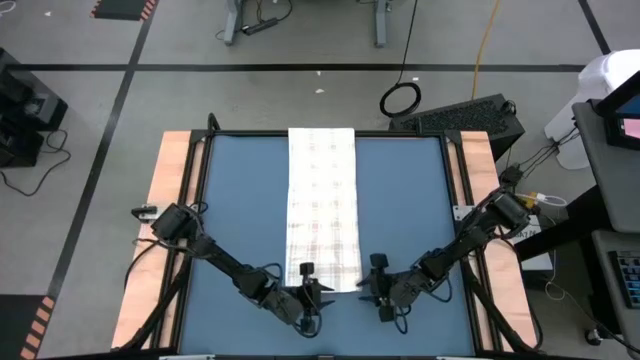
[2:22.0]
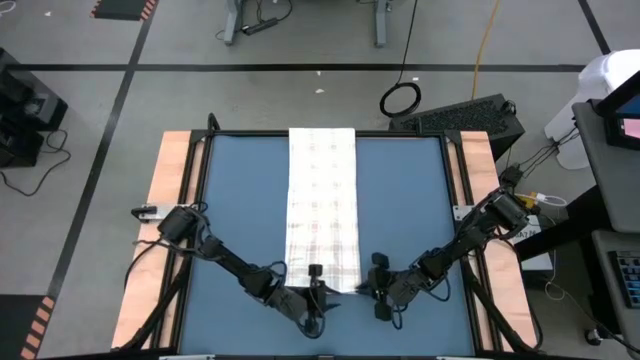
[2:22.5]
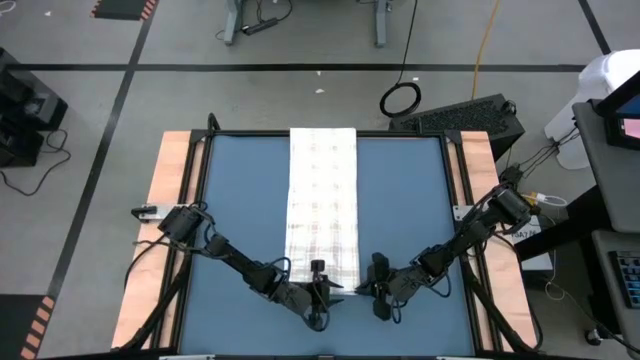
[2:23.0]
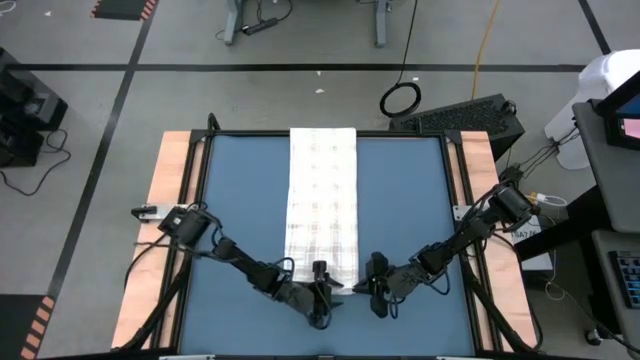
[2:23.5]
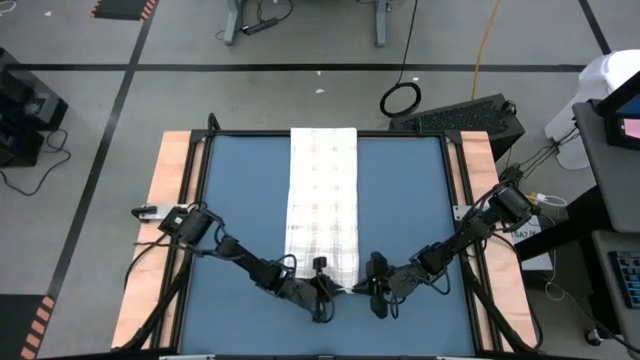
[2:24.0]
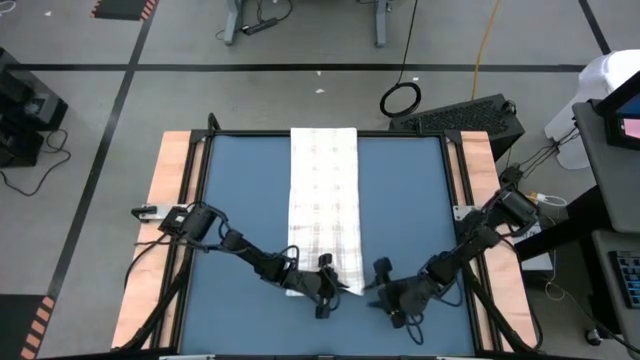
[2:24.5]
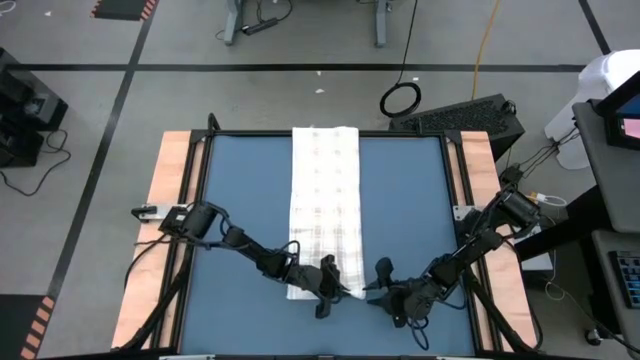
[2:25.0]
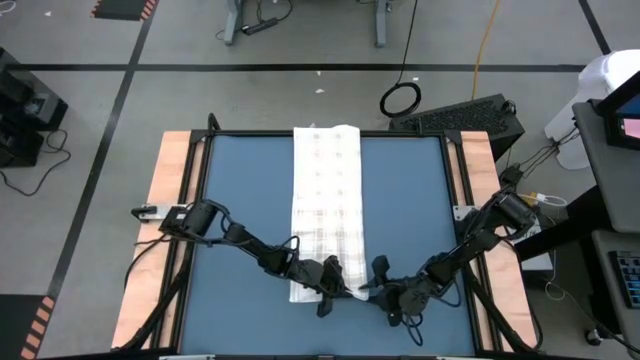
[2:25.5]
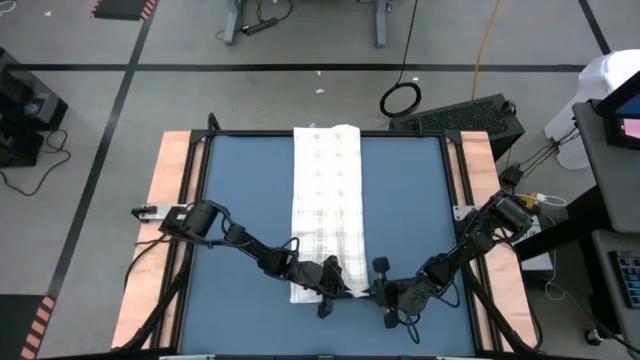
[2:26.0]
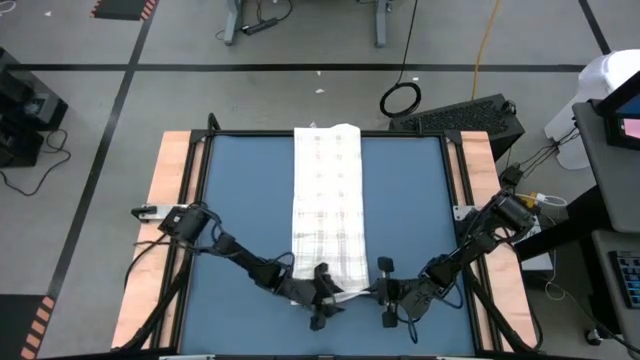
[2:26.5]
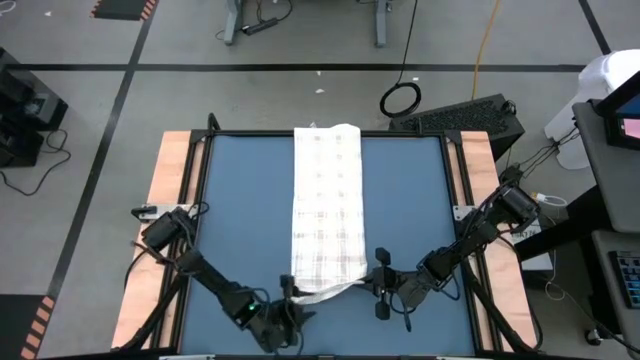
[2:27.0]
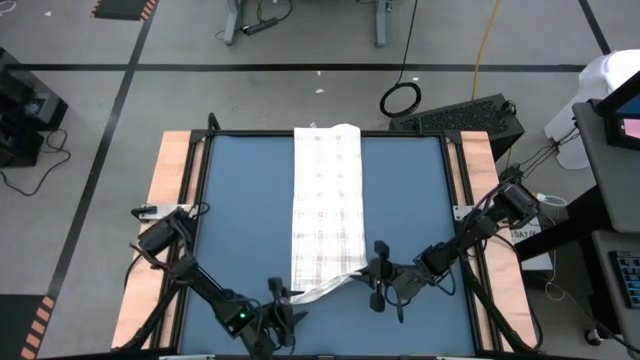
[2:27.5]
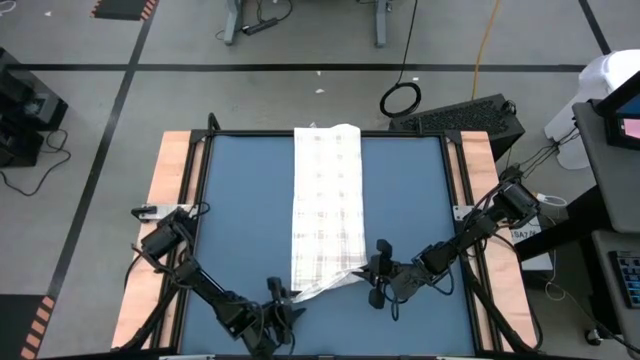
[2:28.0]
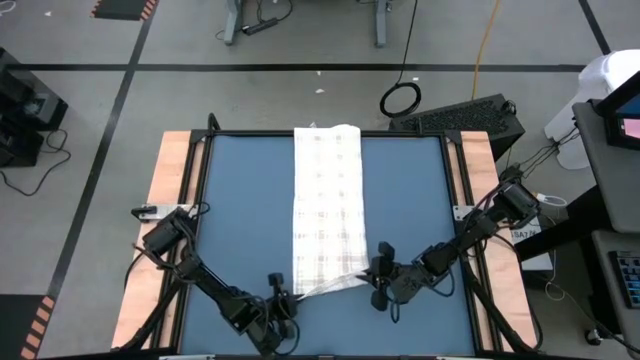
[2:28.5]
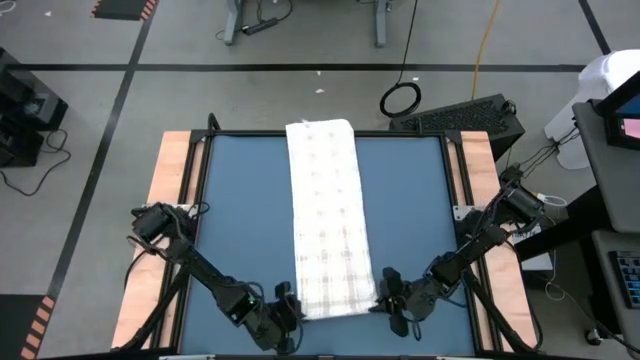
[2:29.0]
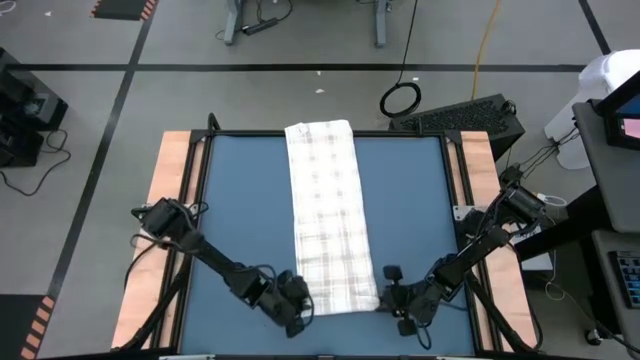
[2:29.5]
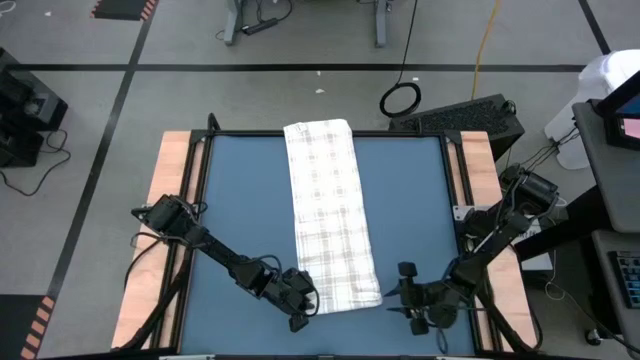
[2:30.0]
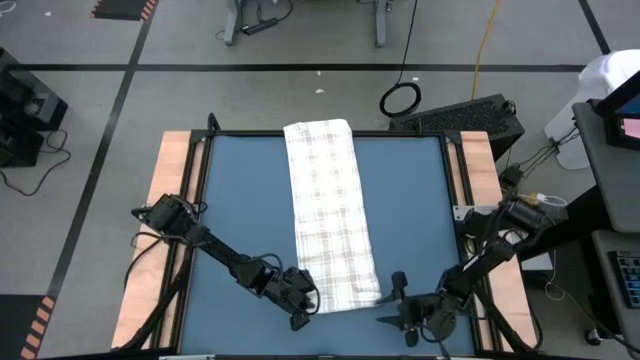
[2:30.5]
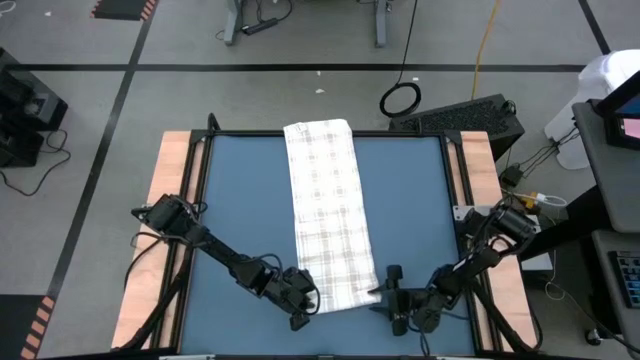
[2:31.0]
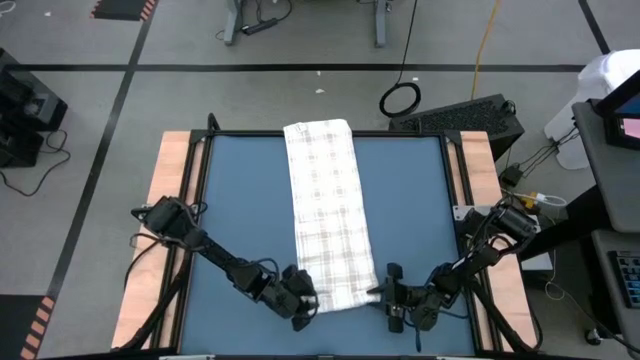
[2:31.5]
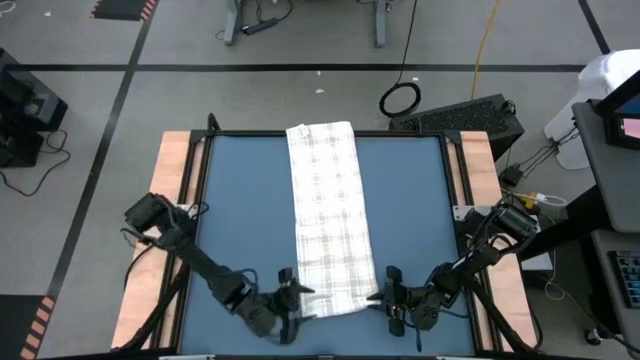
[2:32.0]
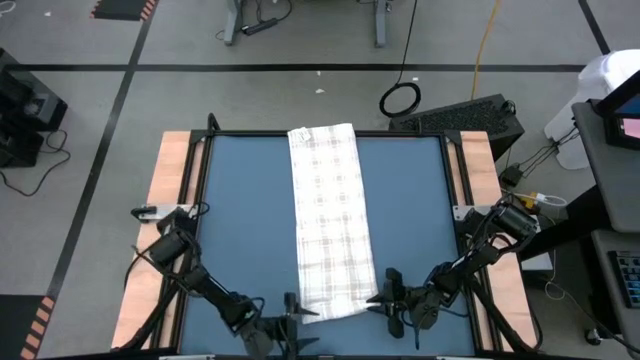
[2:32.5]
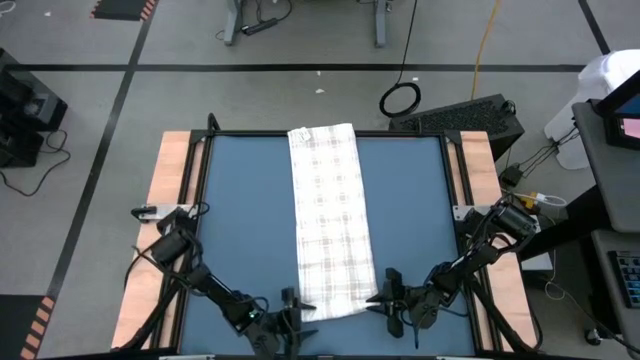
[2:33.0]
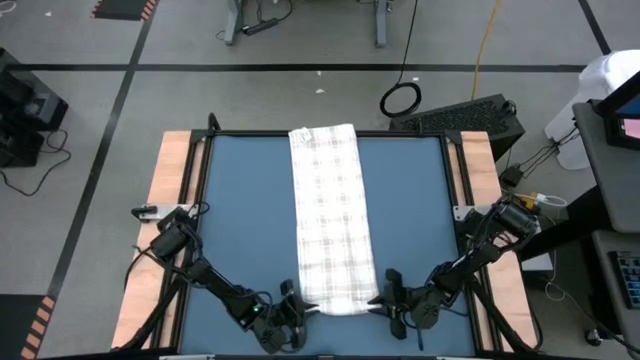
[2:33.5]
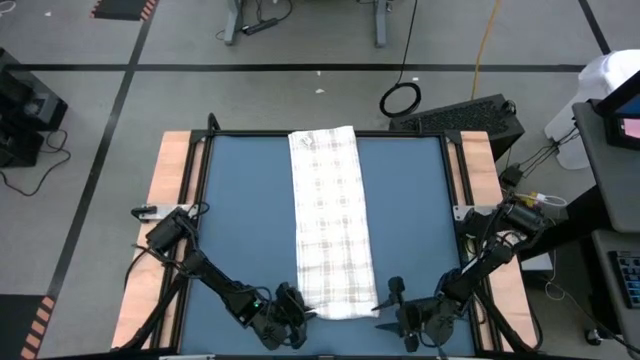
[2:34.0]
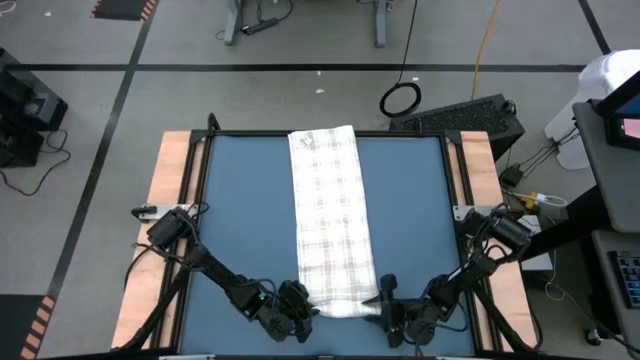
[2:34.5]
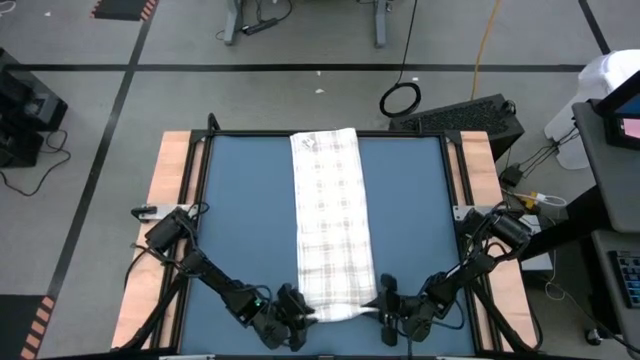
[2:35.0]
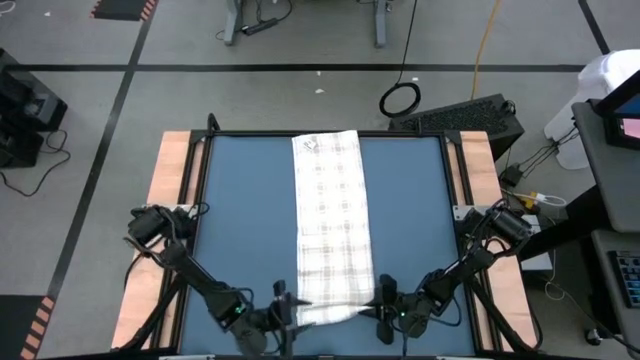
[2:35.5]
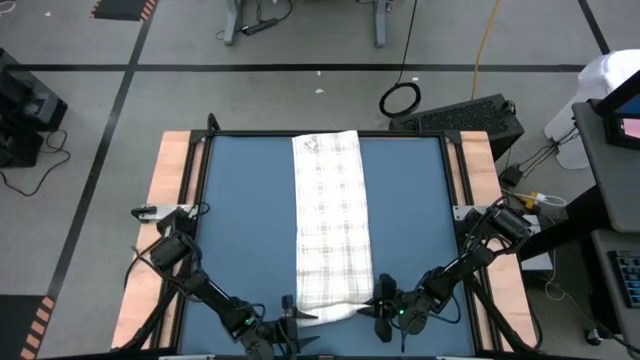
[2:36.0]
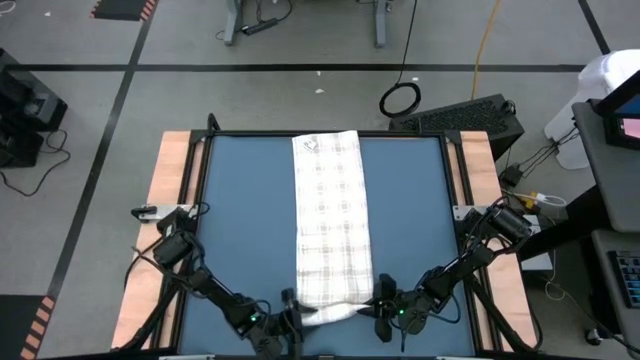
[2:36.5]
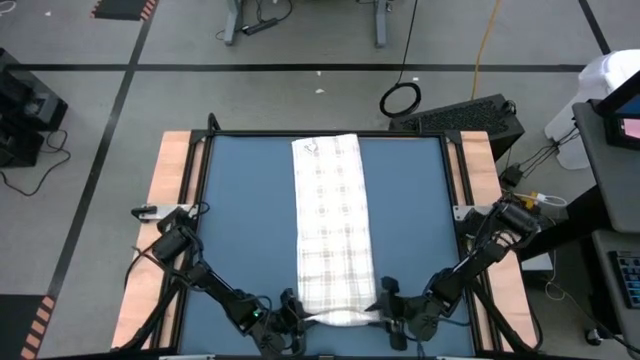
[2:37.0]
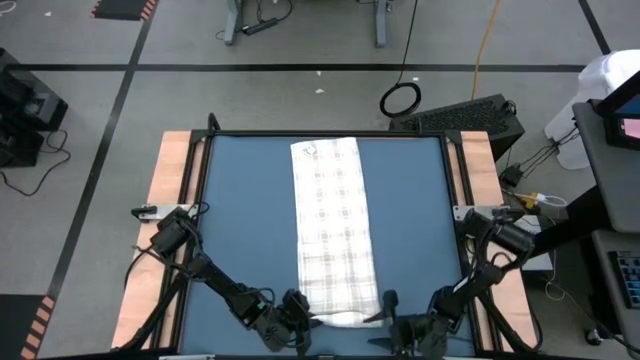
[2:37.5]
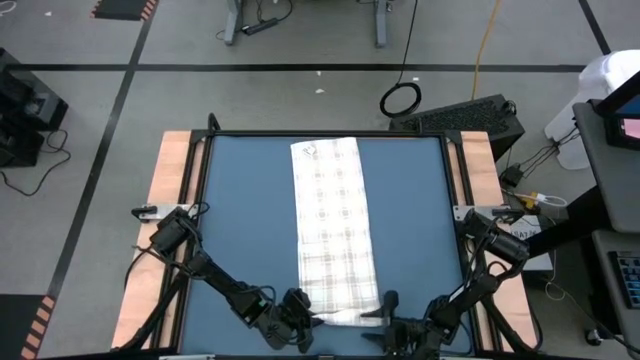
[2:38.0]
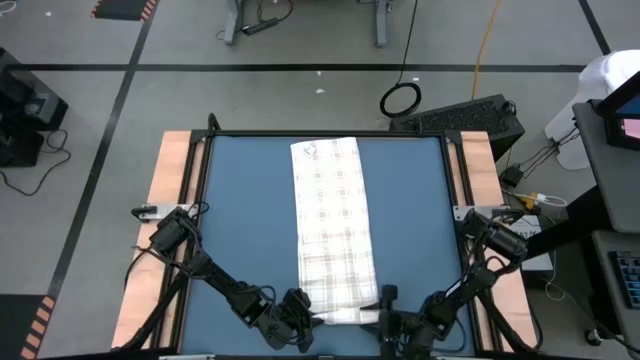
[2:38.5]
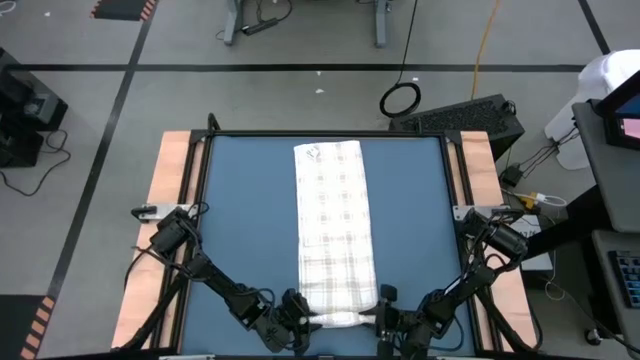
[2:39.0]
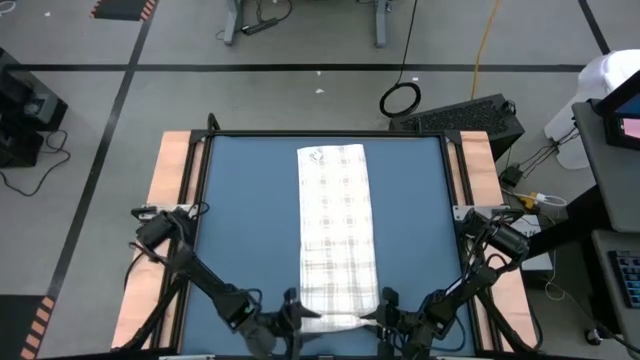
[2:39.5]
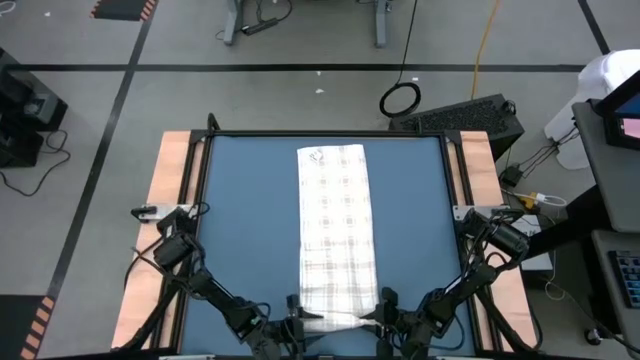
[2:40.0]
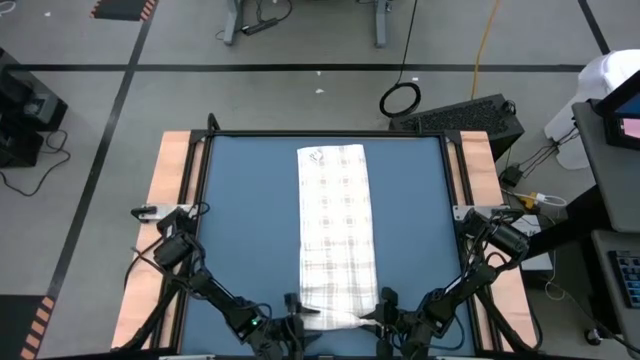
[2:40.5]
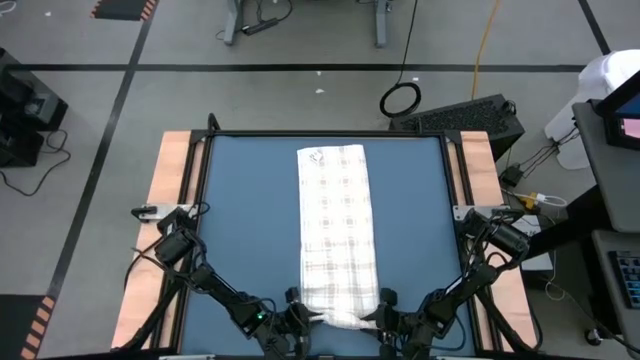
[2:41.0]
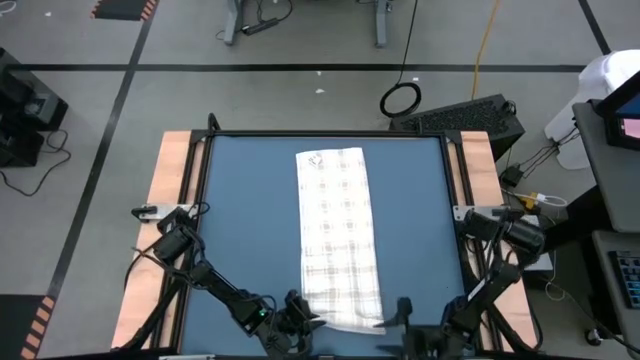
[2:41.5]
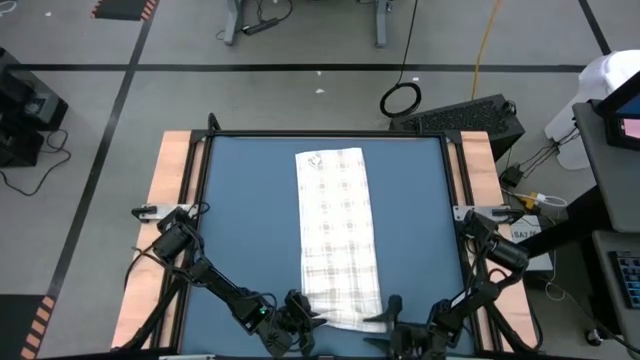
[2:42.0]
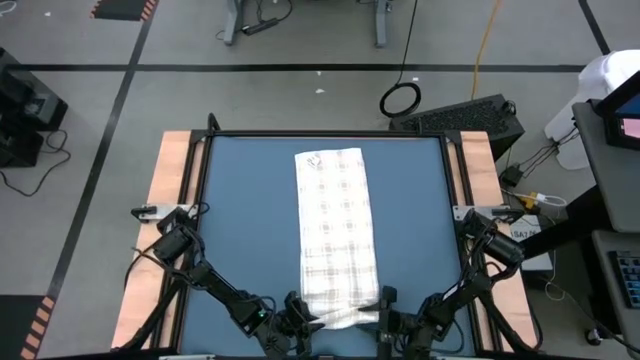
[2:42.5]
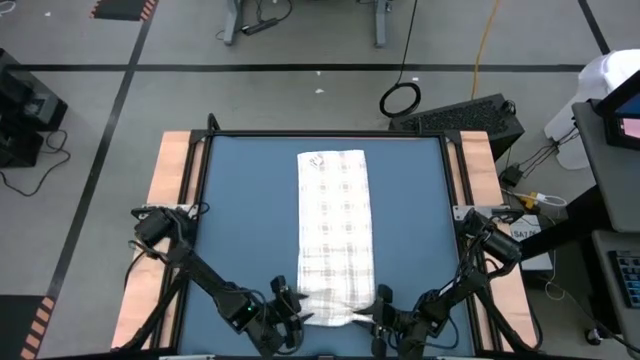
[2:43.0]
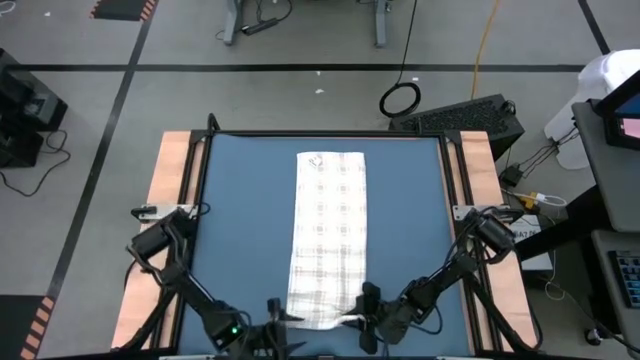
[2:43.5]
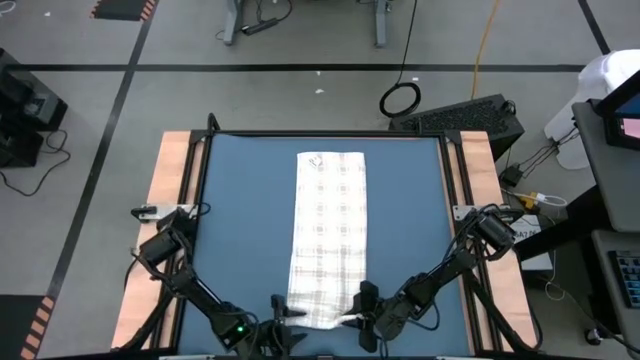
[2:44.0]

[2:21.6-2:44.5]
Task: Roll towel into tight, uniform cylinder
Roll the white towel
